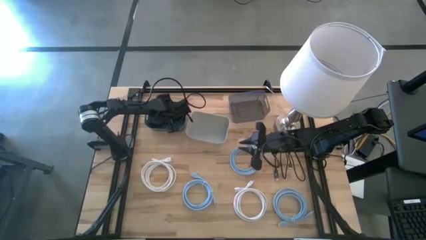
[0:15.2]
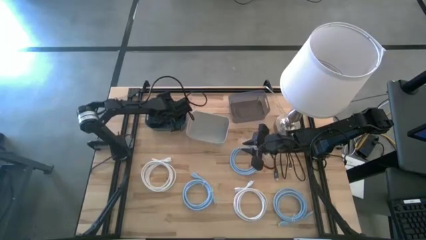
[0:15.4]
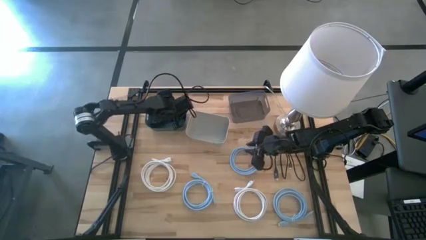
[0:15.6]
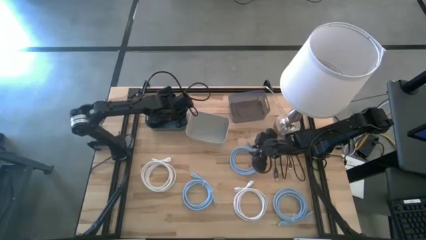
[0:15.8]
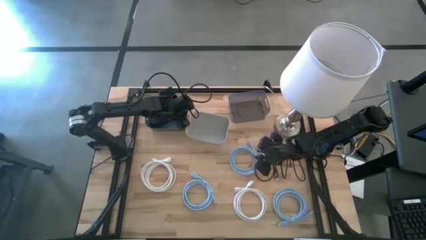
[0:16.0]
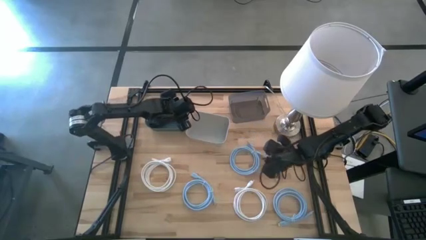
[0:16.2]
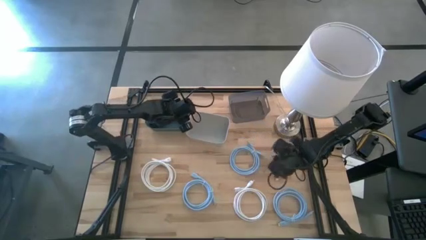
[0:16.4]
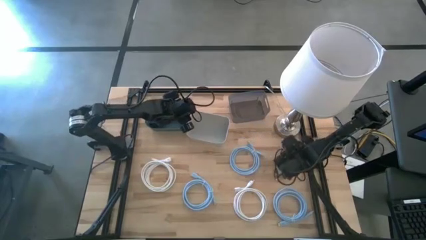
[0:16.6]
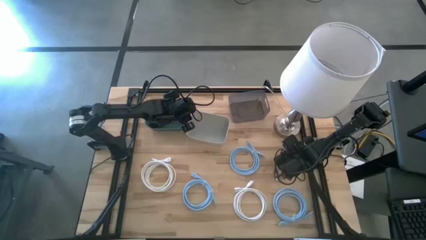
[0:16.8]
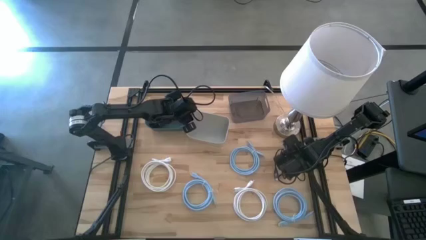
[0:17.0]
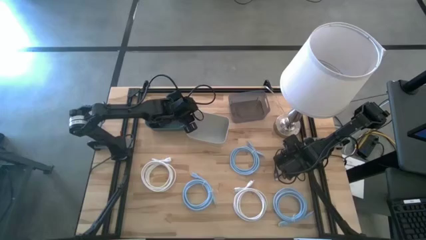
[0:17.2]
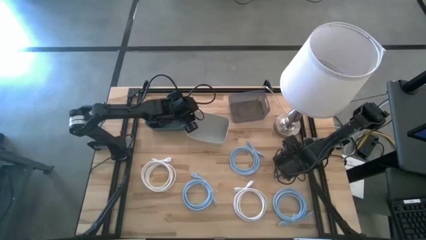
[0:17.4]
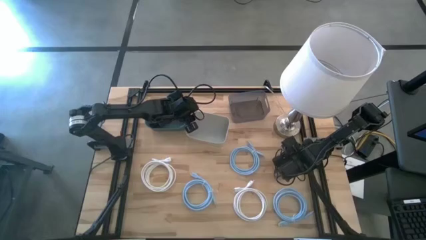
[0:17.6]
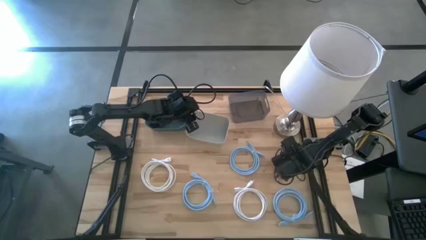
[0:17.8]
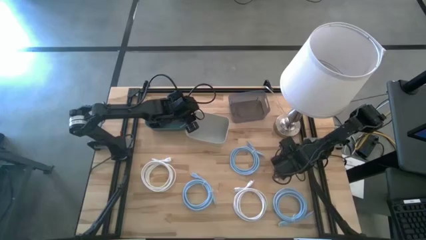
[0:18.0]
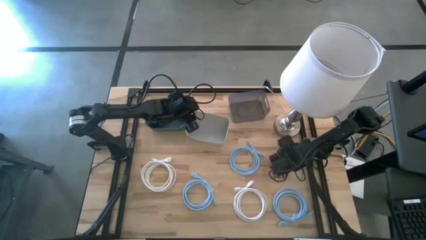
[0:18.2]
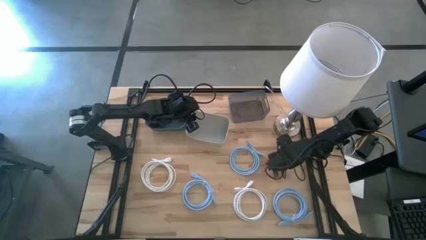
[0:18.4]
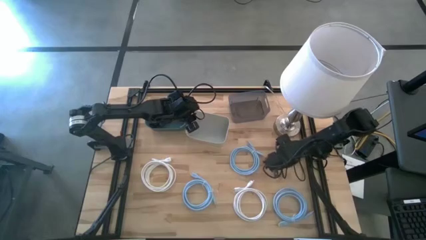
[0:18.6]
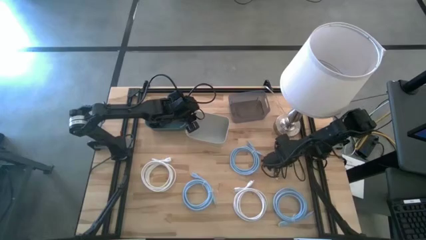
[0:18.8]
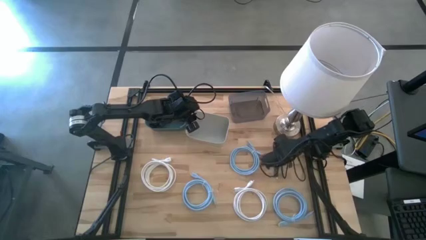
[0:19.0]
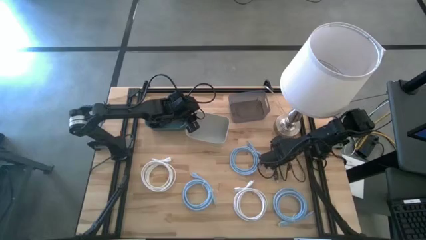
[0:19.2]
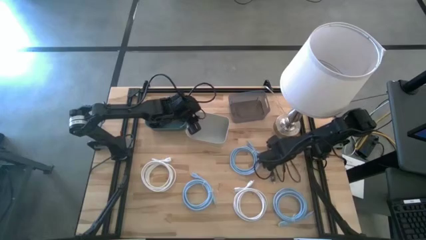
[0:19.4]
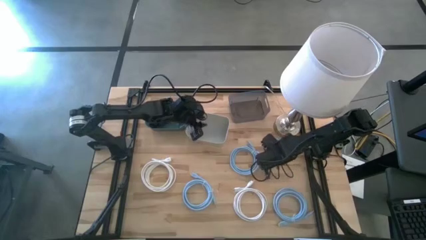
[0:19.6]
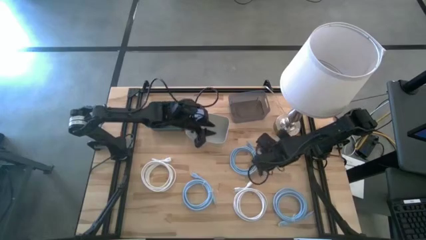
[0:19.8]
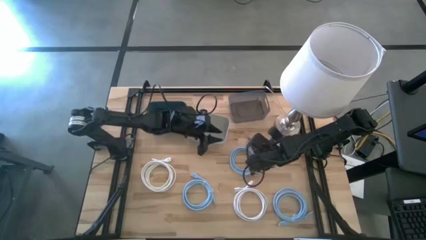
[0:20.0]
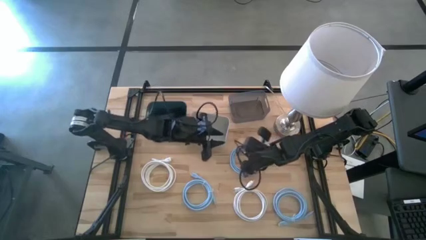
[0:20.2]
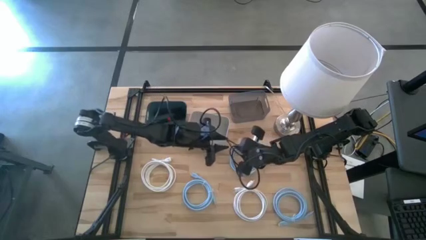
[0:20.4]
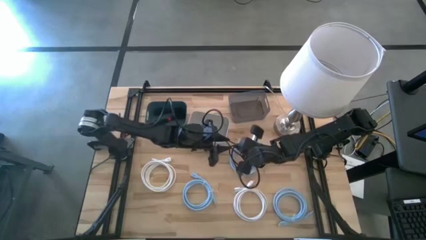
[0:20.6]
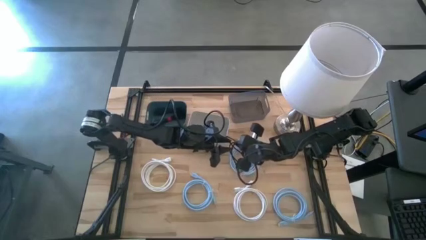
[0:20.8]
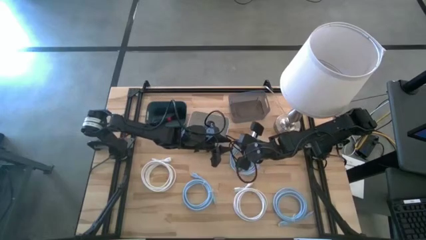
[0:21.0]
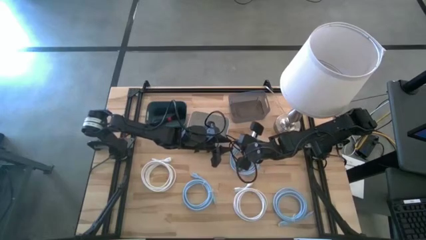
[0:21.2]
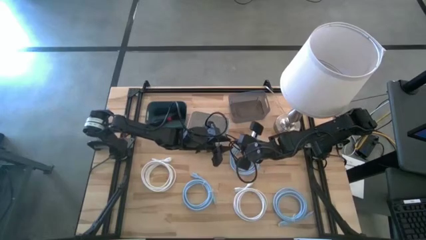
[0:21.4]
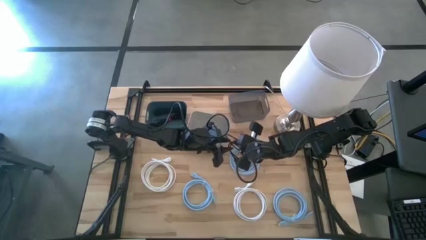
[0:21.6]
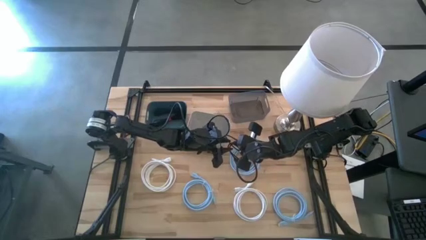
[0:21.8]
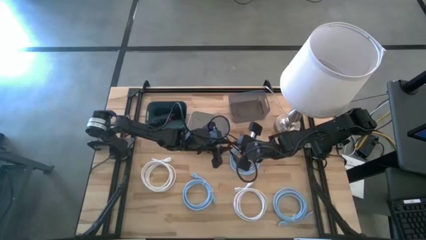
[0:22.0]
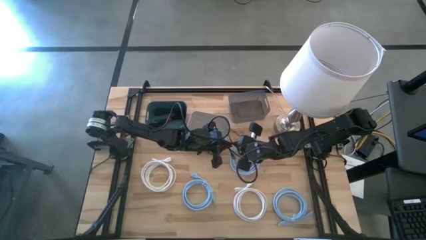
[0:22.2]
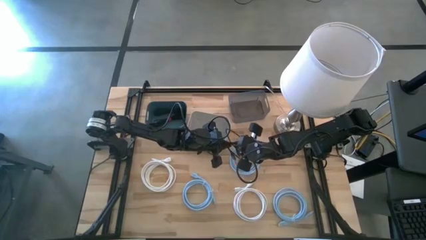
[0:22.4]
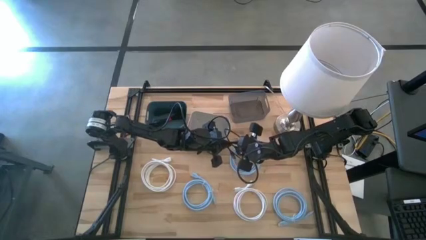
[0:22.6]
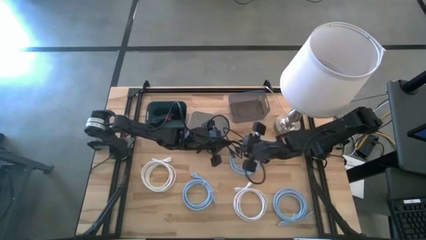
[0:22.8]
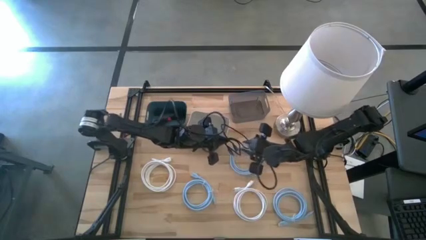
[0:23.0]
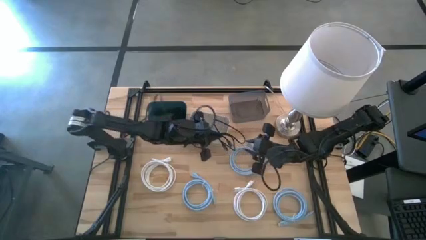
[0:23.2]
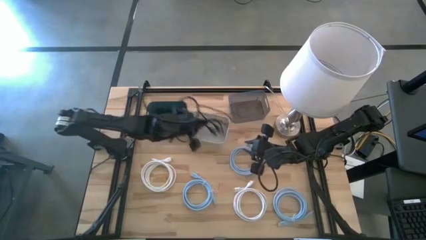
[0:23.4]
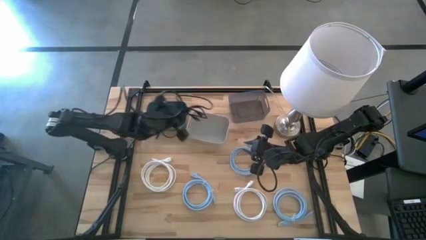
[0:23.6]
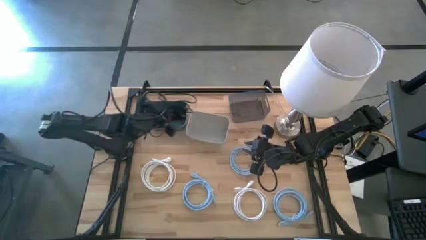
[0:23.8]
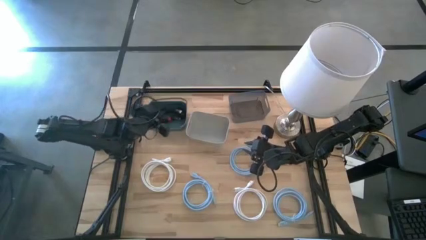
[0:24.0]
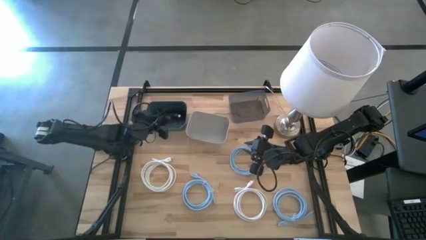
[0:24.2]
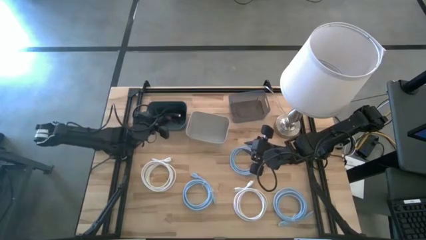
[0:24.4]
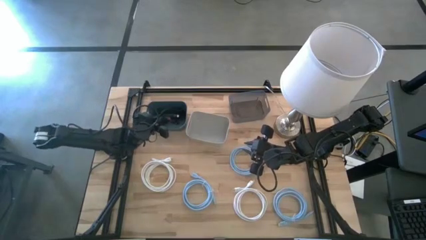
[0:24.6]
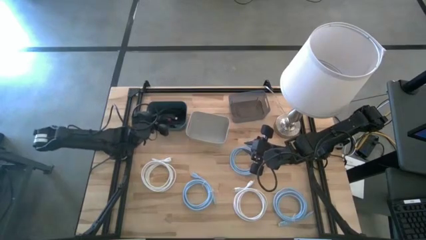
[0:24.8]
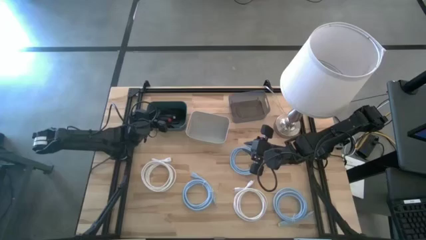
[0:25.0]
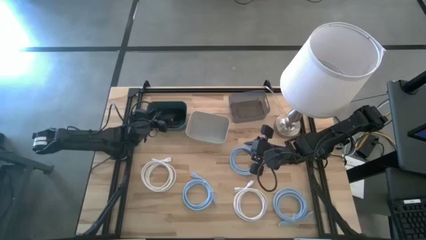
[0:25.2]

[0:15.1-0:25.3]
Task: Pick & Place USB Port
Put the black charger cable into the gray bin

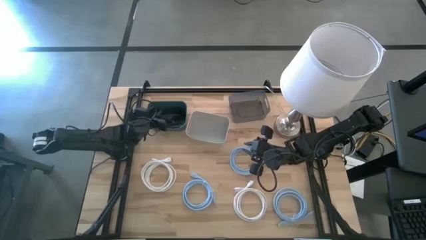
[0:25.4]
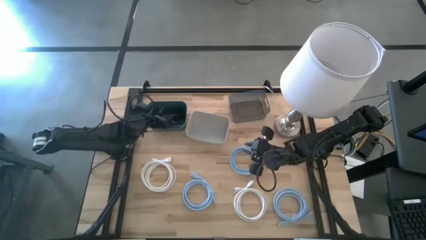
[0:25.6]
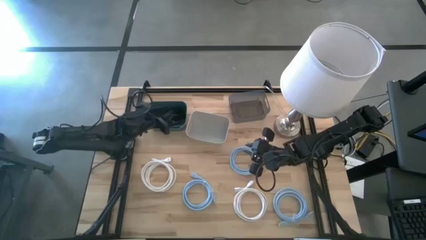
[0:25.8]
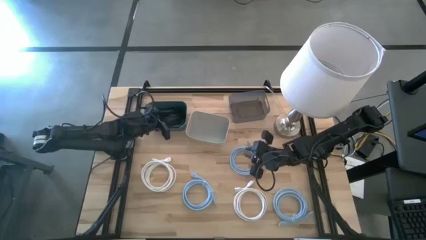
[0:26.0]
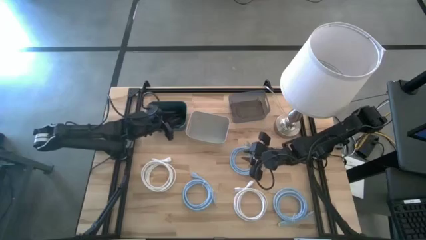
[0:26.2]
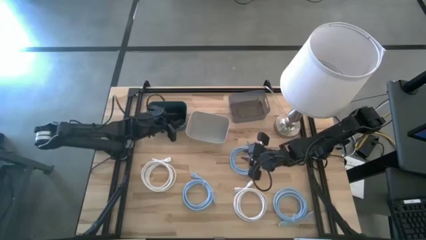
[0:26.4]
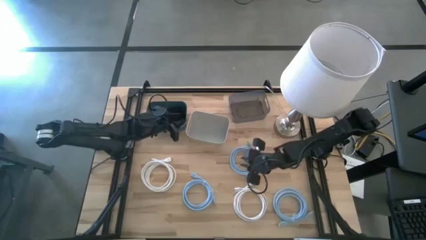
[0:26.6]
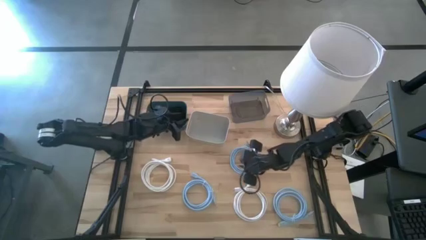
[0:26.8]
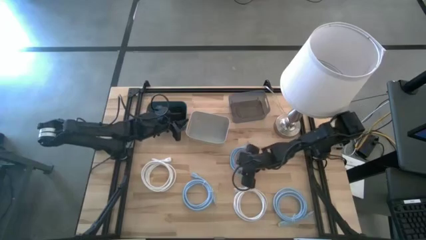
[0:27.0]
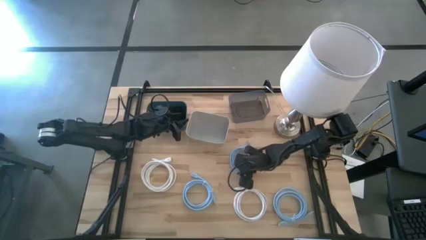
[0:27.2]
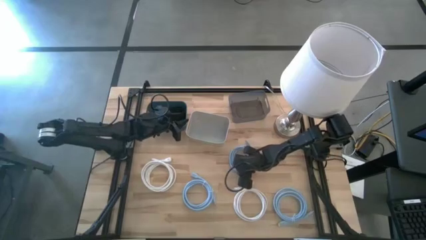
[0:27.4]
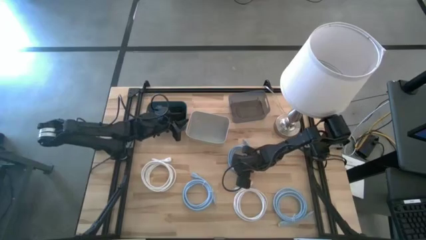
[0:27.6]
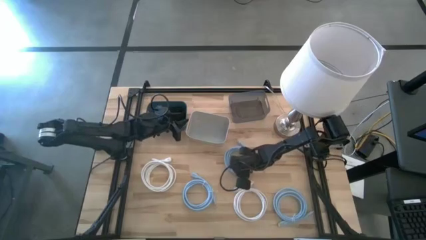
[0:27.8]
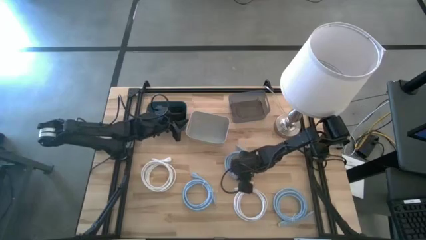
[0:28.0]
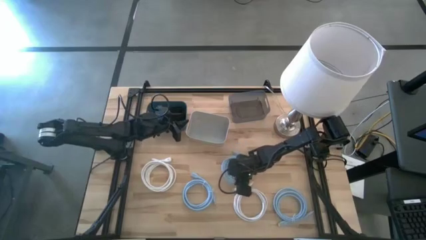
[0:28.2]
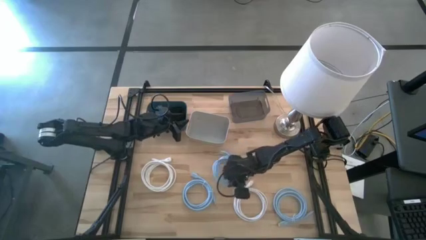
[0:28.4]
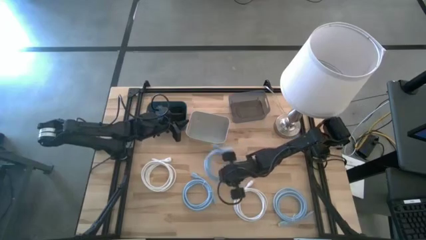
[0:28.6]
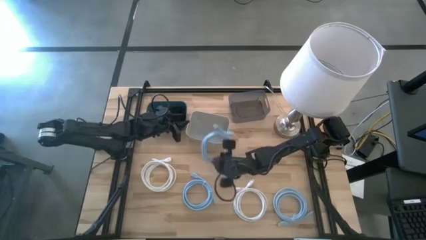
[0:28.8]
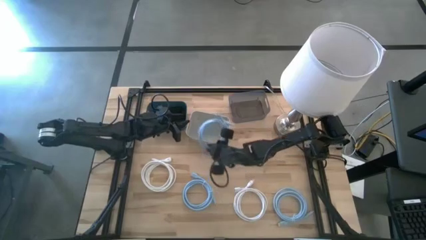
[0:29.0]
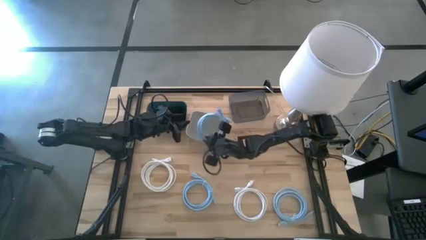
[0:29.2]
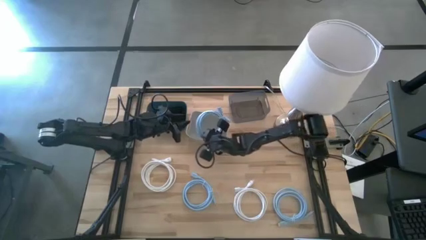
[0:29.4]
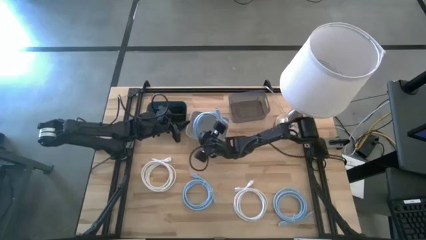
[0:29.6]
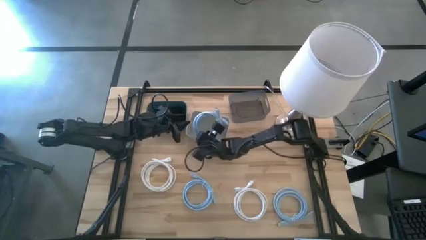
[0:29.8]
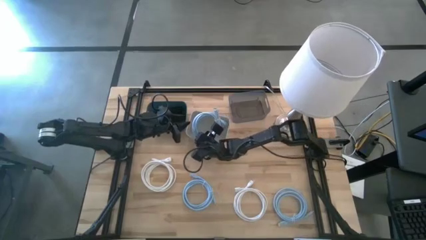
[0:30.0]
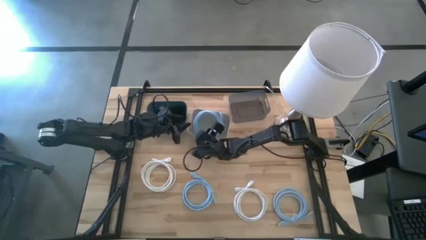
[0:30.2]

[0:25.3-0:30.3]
Put the top blue charger cable into the white bin

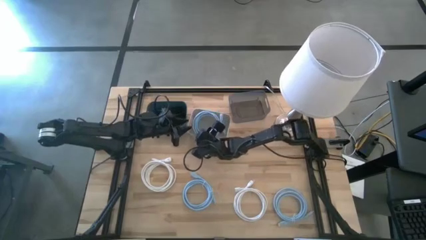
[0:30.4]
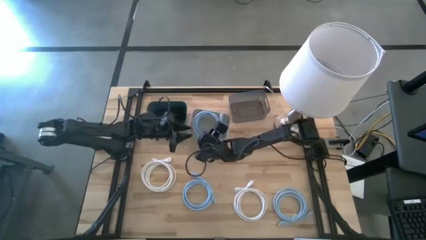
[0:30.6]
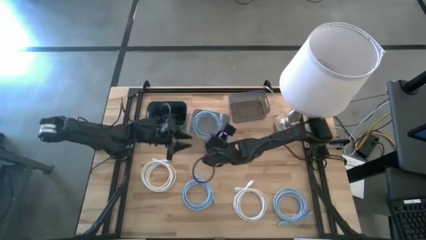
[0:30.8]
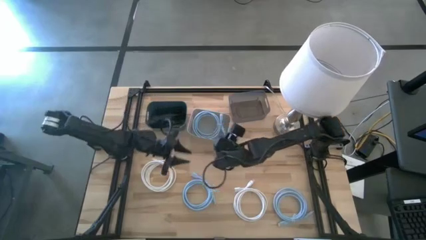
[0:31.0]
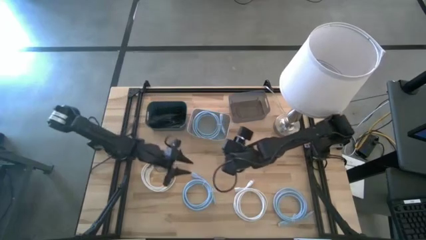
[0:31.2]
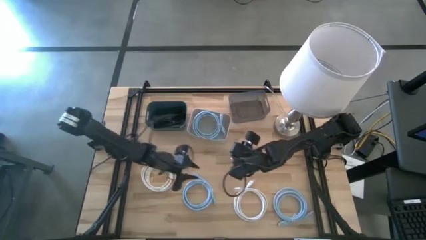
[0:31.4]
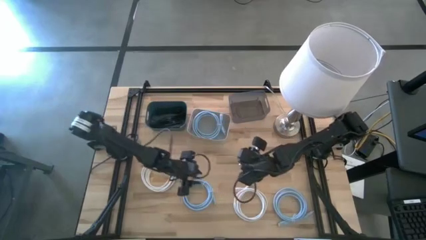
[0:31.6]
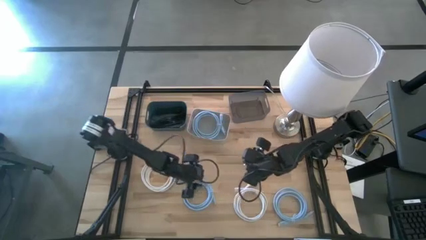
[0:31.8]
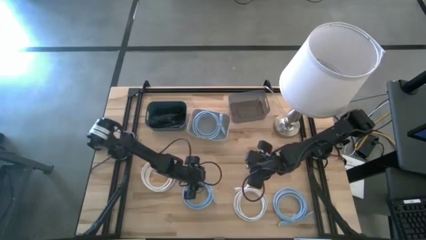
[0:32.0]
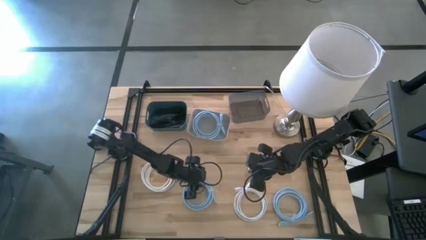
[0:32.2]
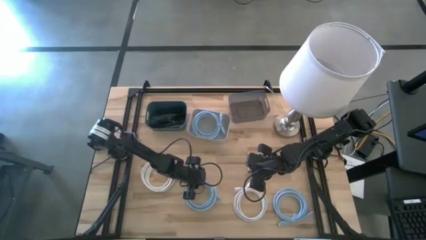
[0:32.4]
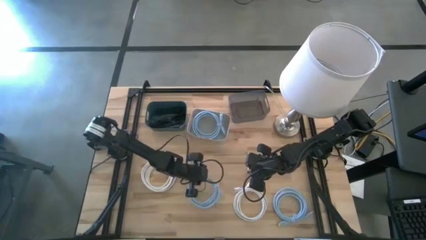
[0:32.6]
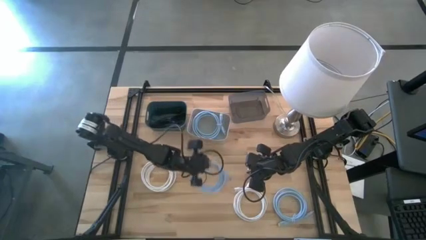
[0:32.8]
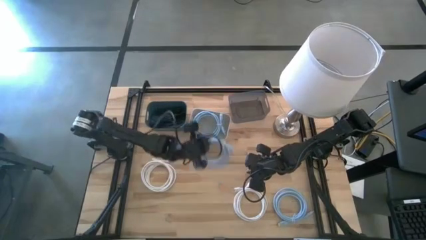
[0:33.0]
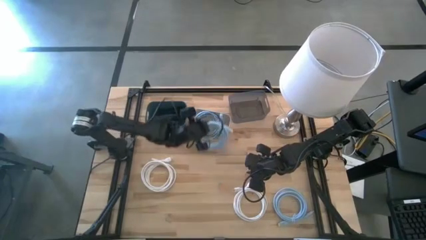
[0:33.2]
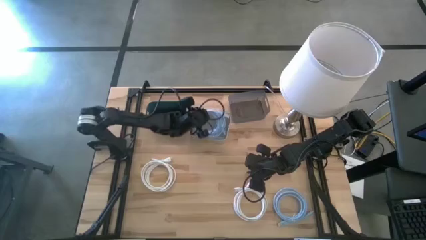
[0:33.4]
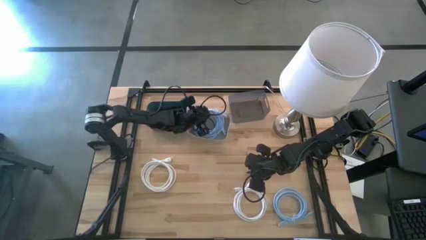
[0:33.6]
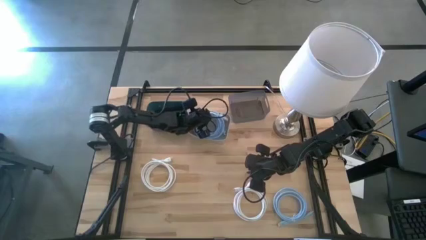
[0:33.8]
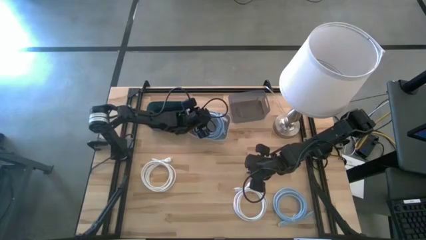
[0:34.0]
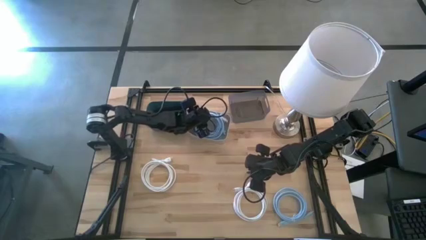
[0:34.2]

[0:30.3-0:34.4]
Put the left blue charger cable into the white bin
